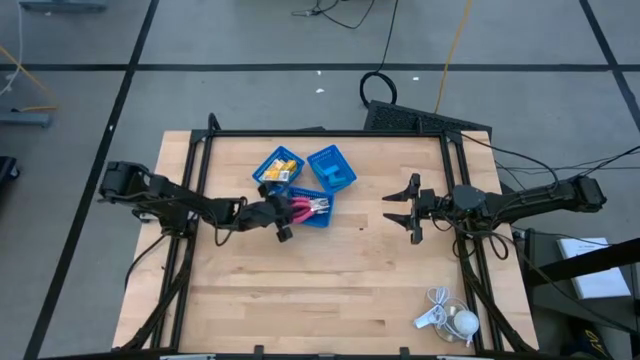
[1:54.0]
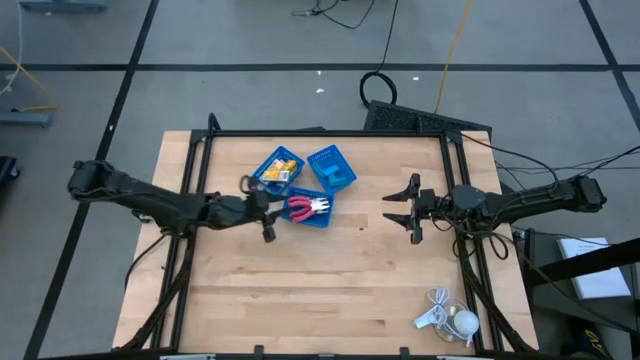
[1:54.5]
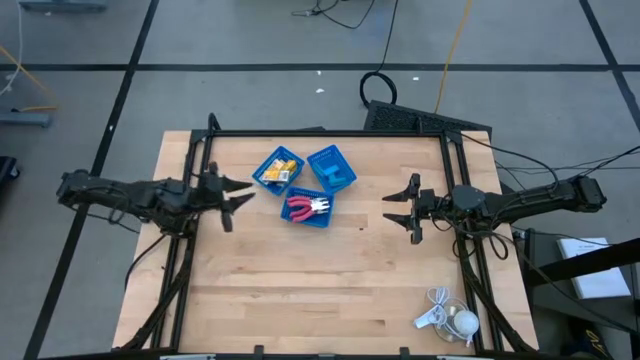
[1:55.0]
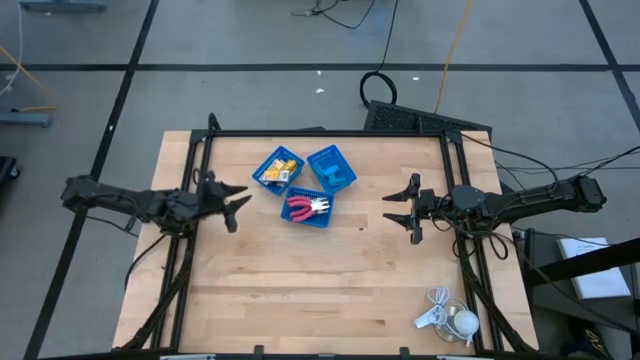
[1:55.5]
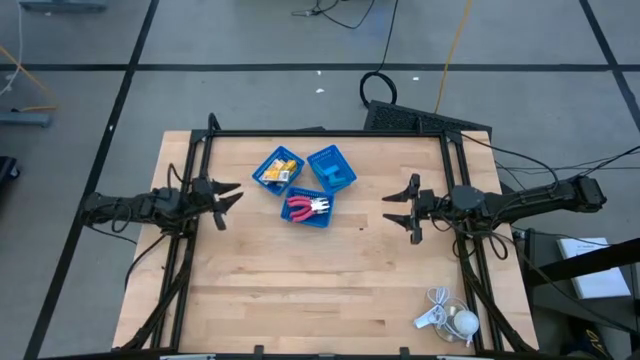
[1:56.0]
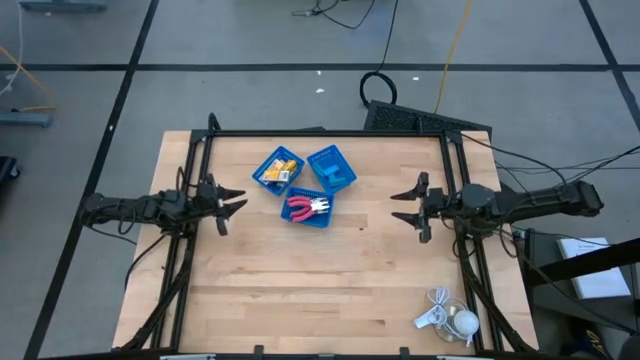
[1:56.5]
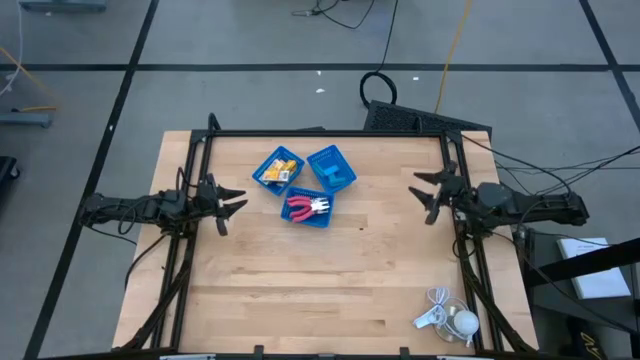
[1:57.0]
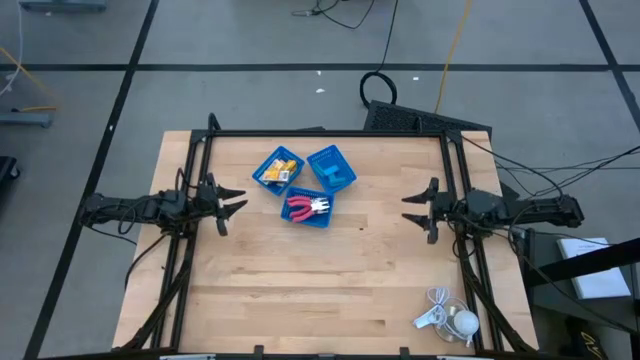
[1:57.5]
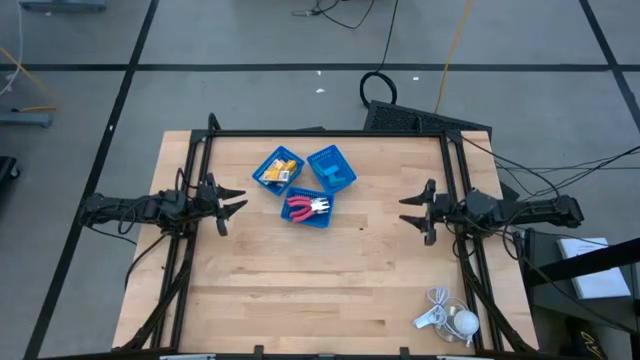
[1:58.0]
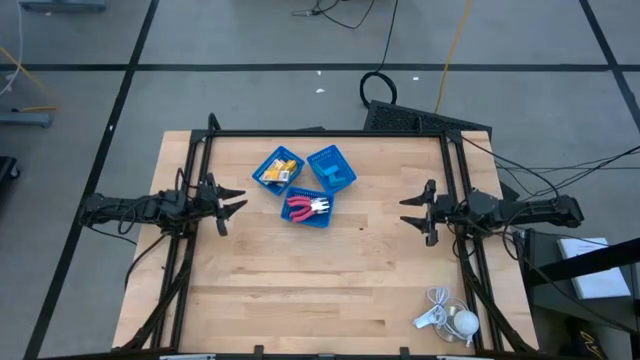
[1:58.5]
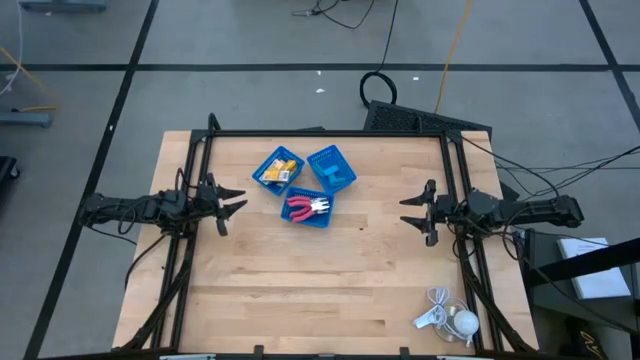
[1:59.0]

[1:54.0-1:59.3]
Task: Pick & Place School Supplies
Return to Home Position

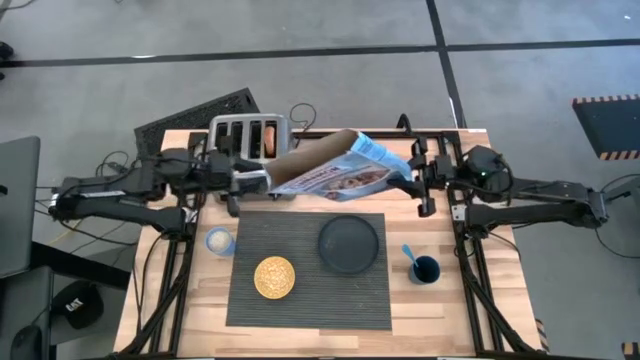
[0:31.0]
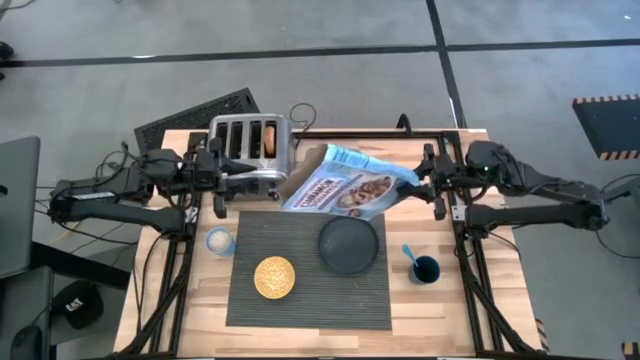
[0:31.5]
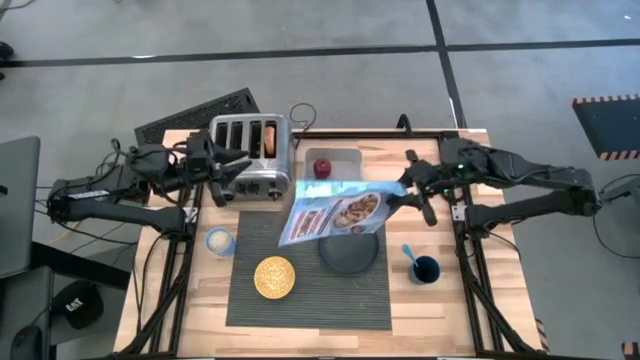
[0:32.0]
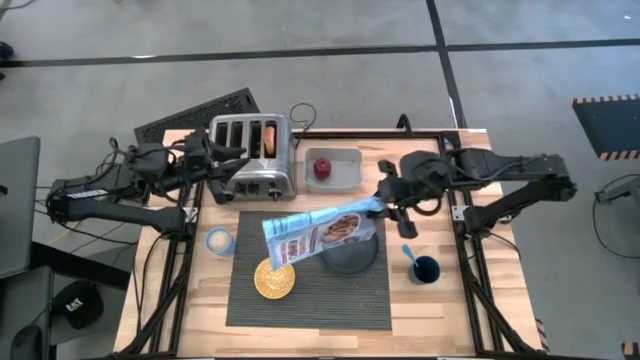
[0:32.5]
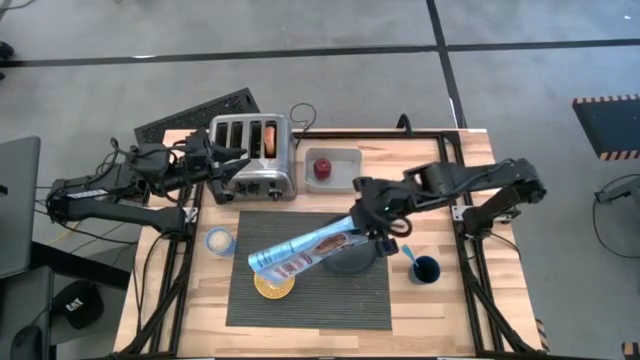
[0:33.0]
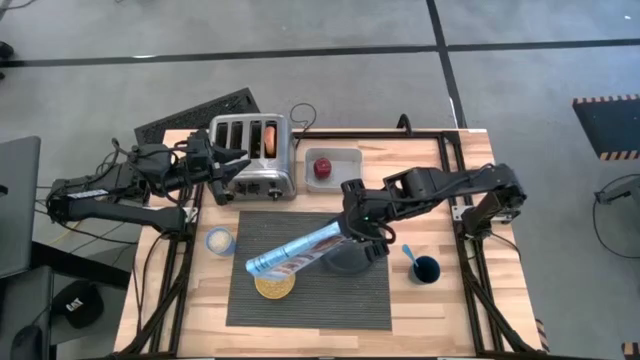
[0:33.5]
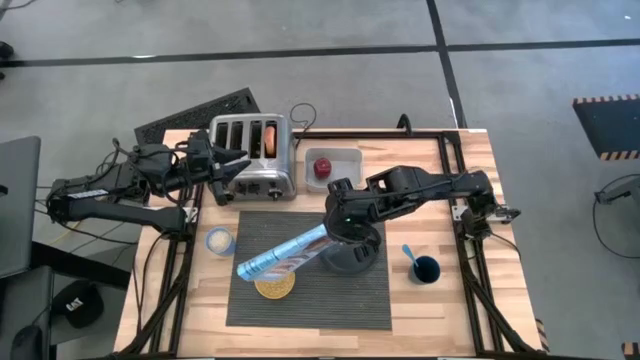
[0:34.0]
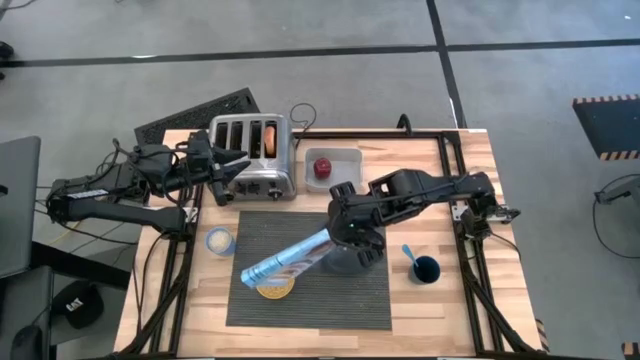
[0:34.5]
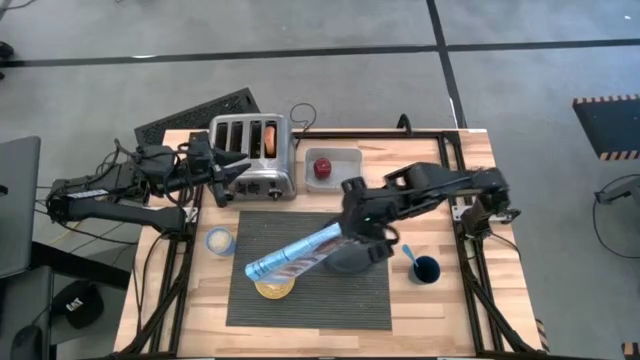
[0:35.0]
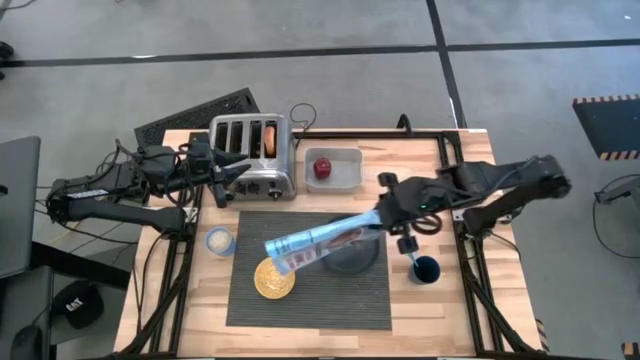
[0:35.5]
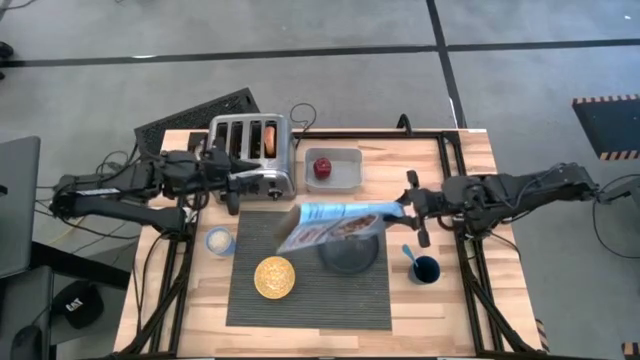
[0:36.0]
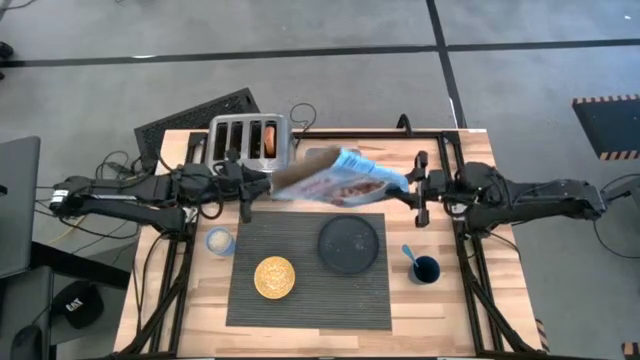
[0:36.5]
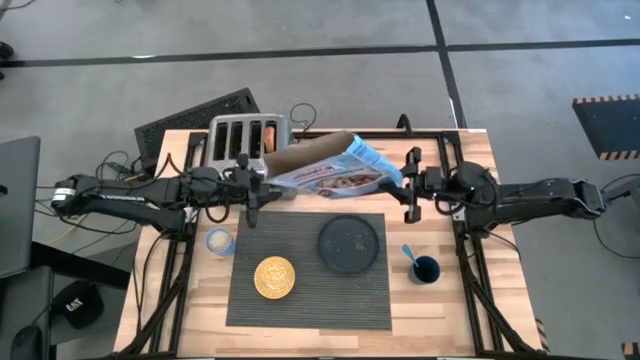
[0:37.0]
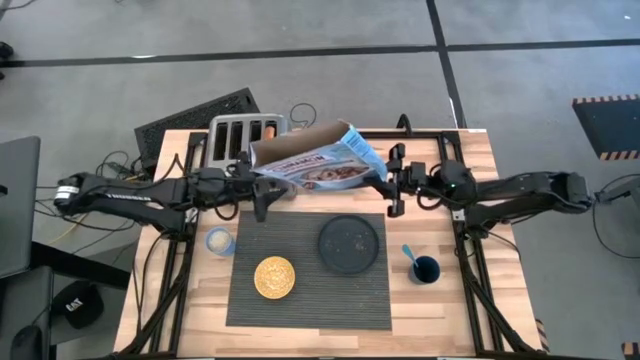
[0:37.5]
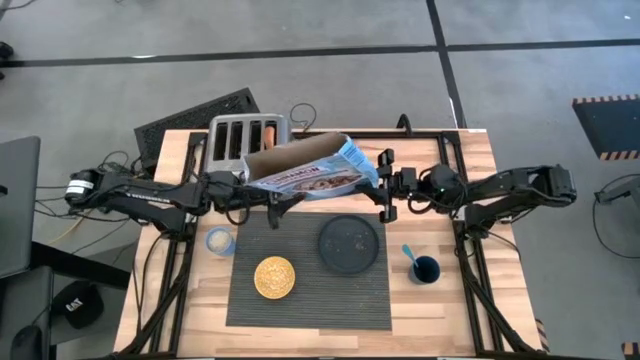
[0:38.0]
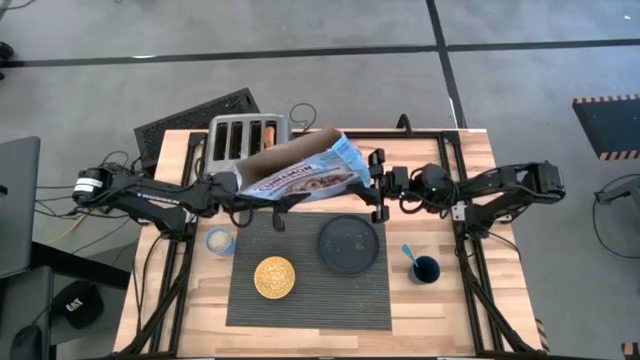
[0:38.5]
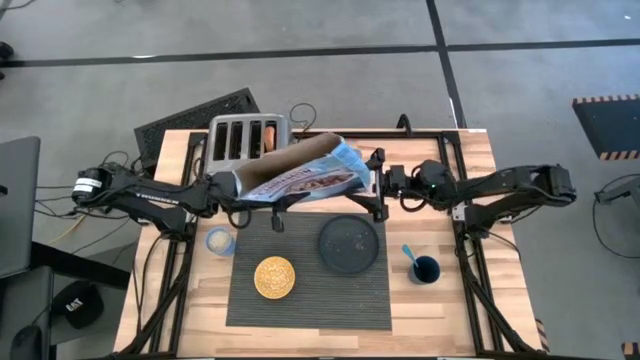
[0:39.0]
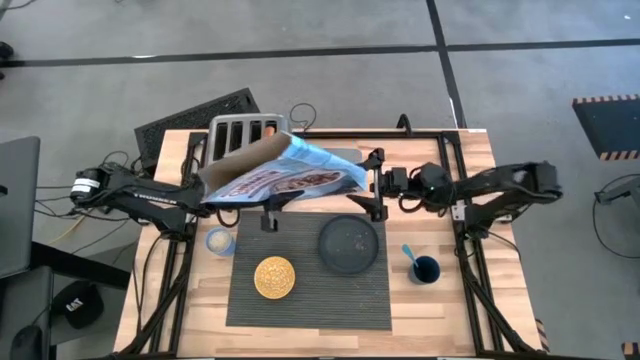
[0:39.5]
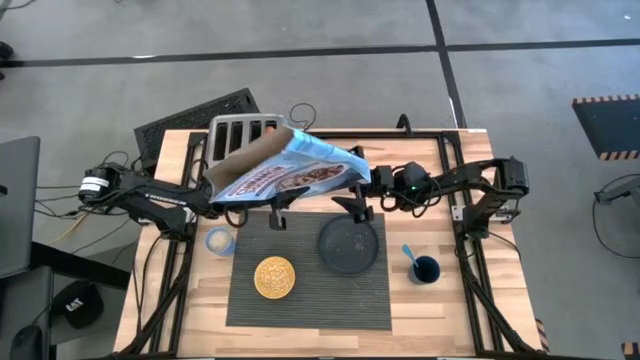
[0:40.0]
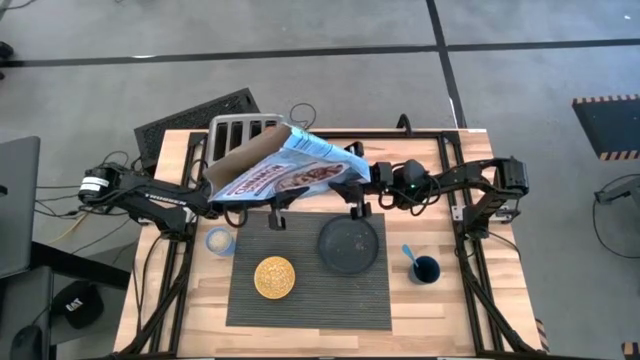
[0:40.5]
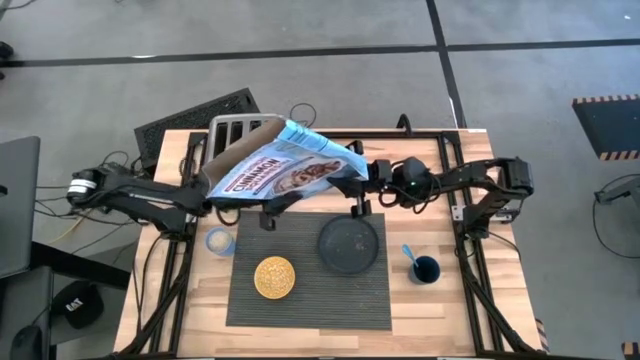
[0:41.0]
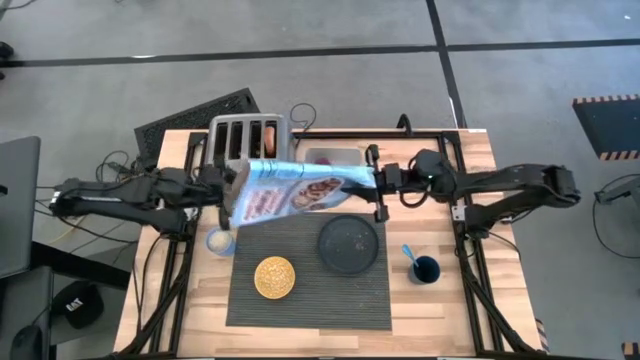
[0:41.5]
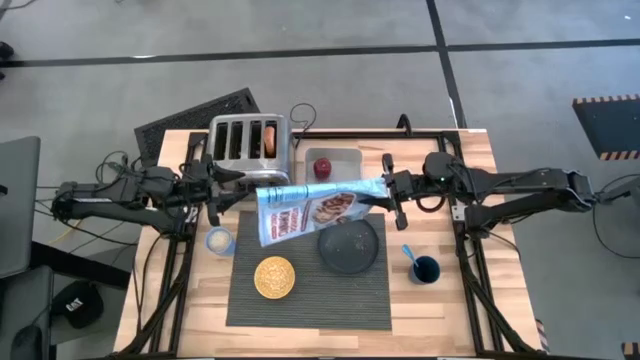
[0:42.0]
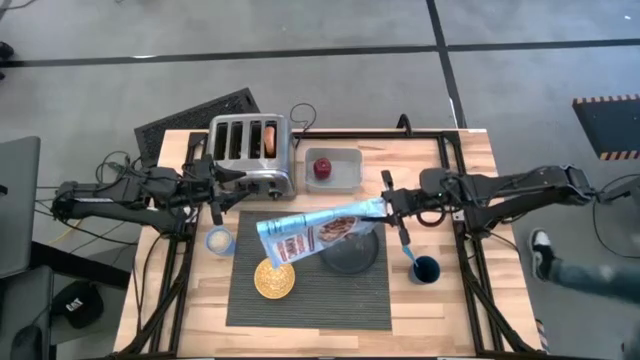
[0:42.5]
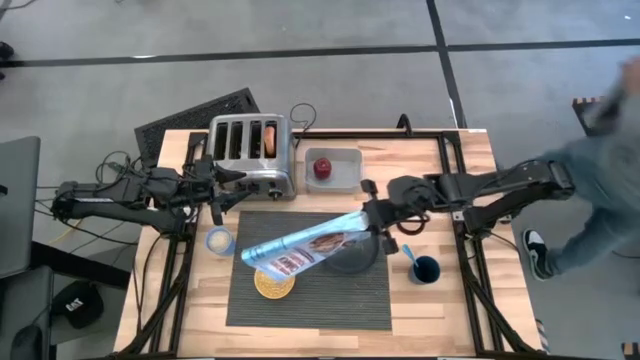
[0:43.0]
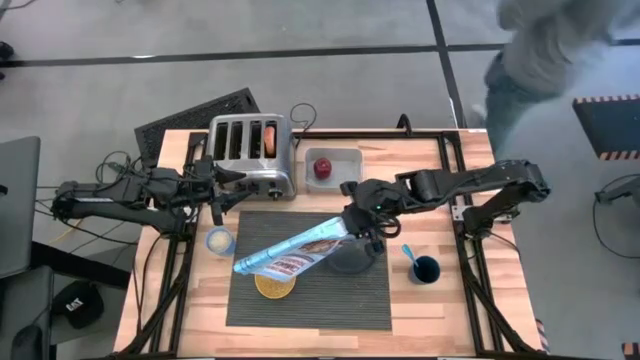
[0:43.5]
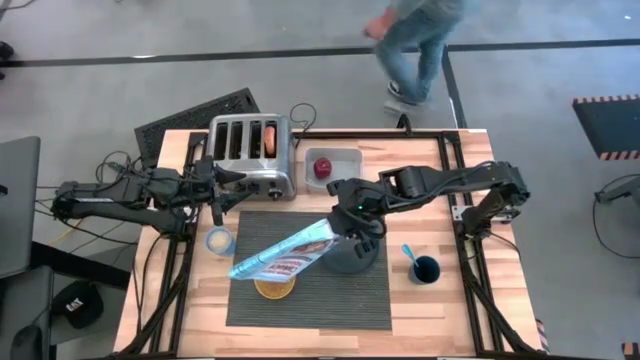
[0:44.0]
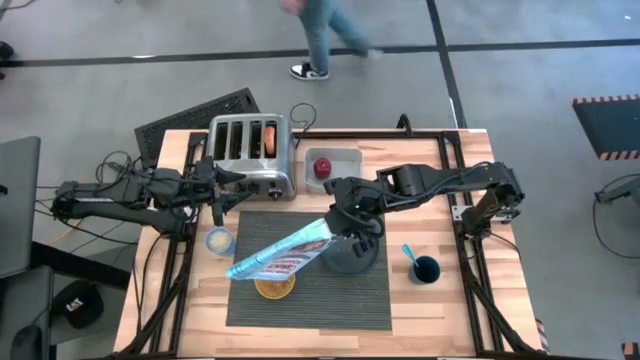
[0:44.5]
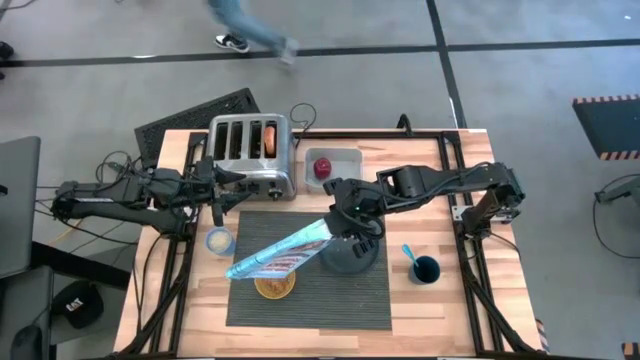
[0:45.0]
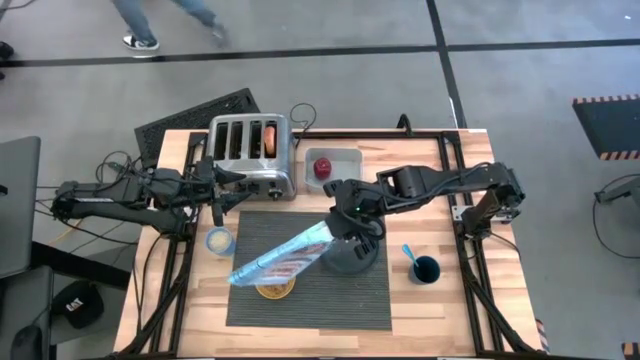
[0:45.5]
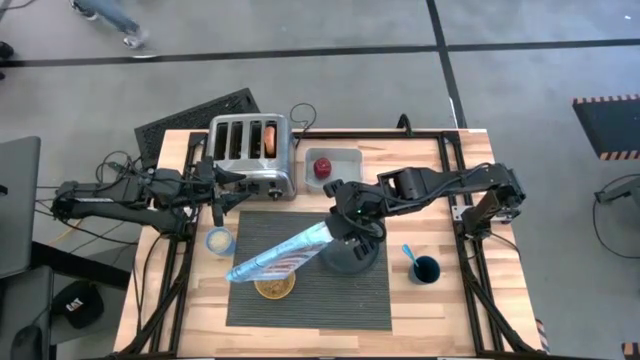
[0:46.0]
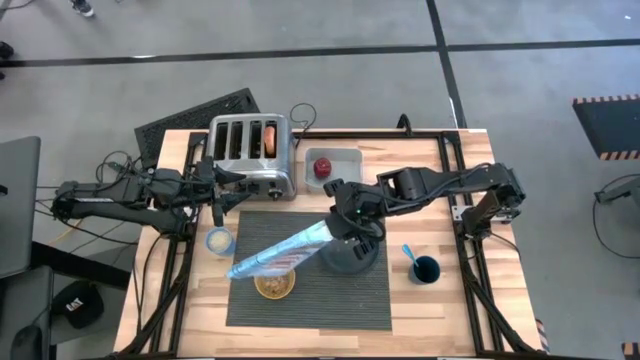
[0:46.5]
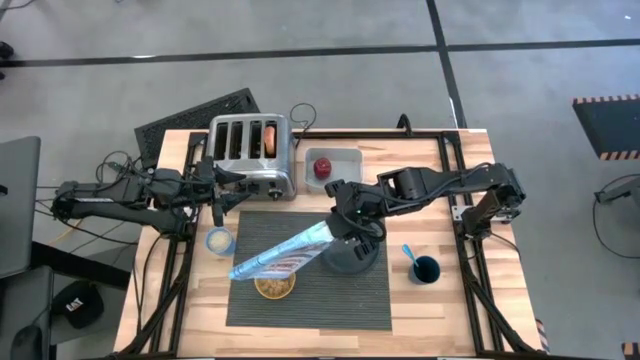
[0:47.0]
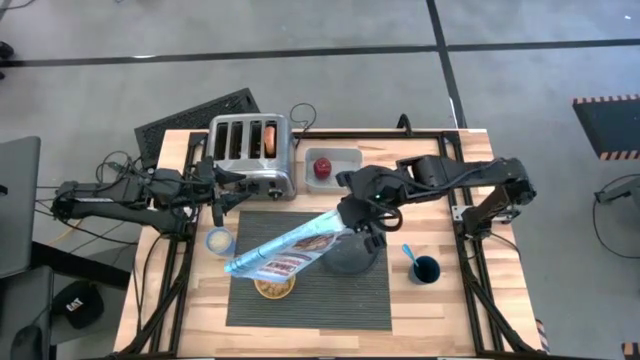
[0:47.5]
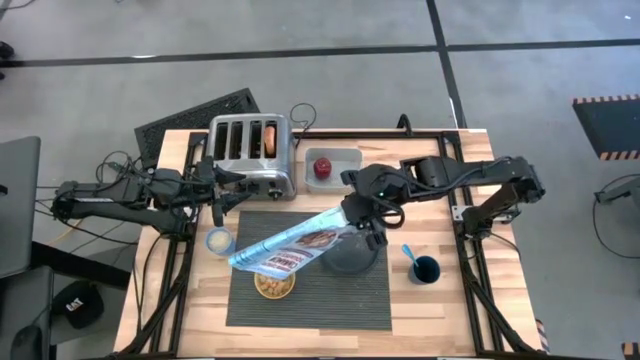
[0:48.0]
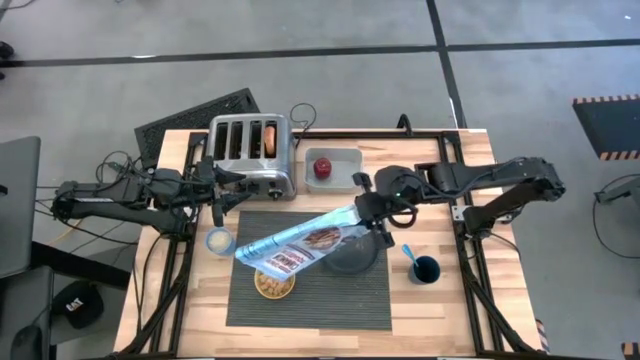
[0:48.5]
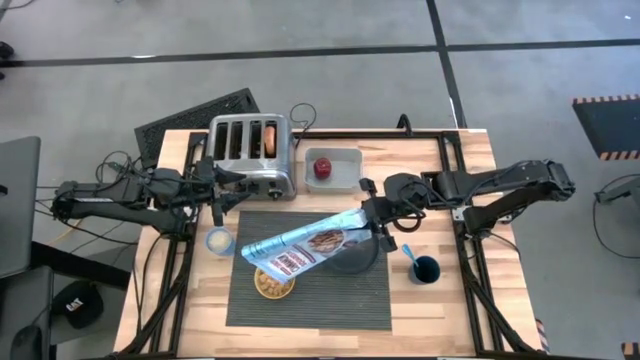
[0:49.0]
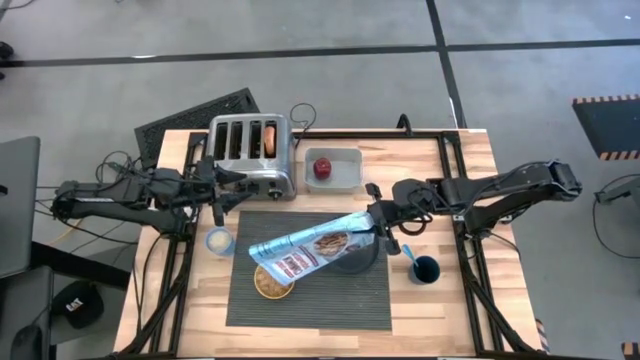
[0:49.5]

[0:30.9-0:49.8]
Task: Arrange a breakfast setting
Pour the cereal from the blue cereal box into the yellow patterned bowl
